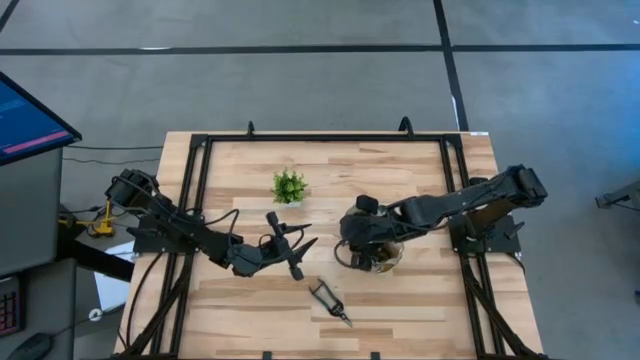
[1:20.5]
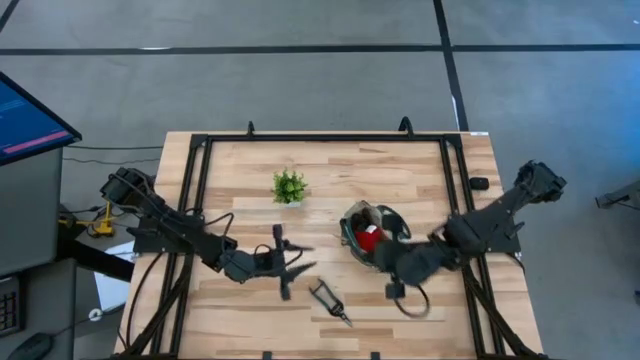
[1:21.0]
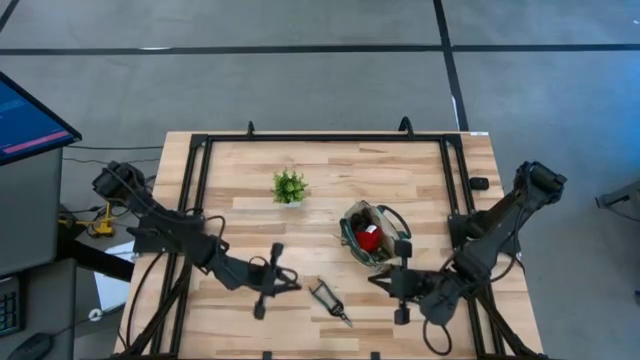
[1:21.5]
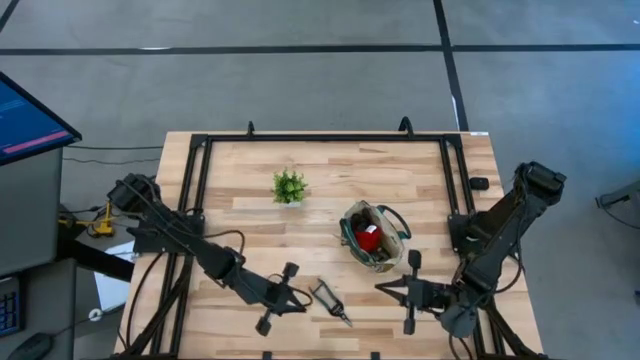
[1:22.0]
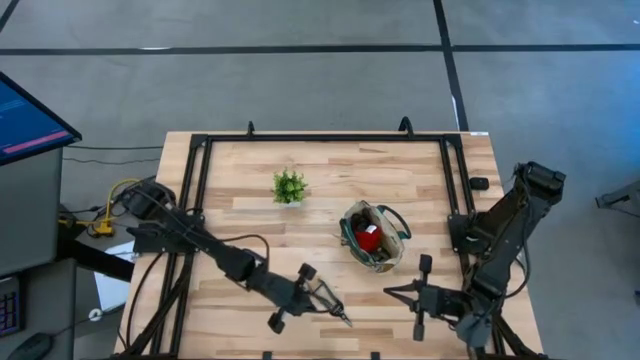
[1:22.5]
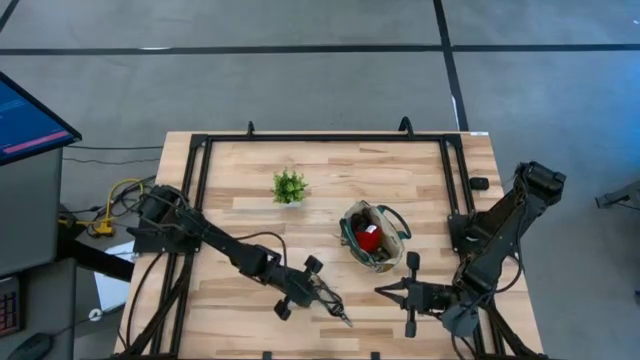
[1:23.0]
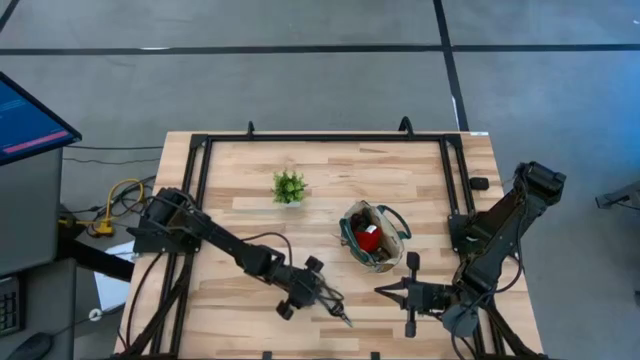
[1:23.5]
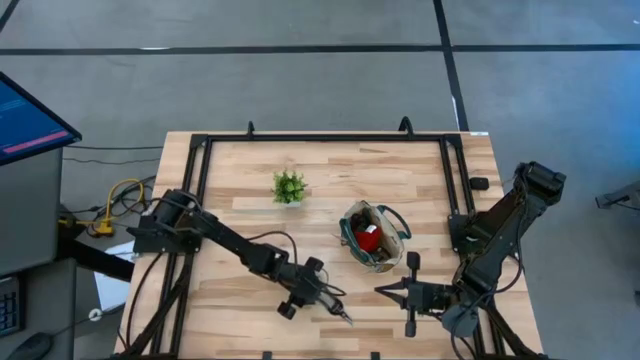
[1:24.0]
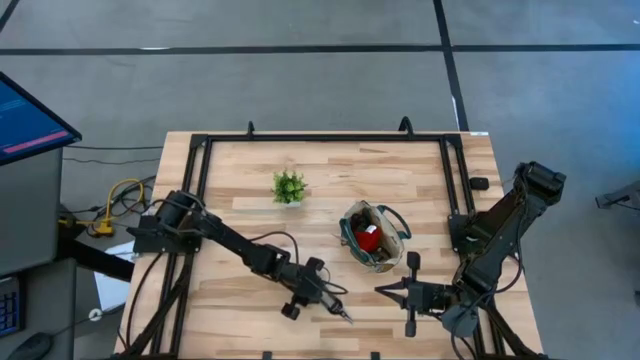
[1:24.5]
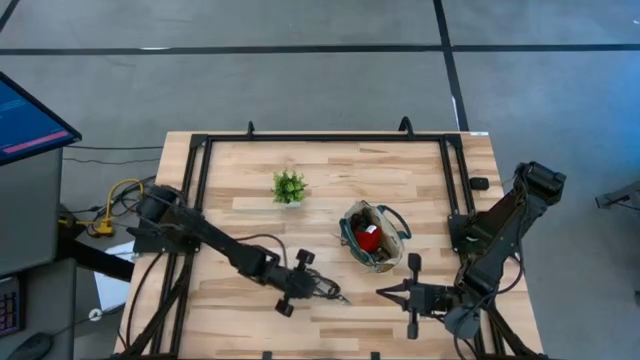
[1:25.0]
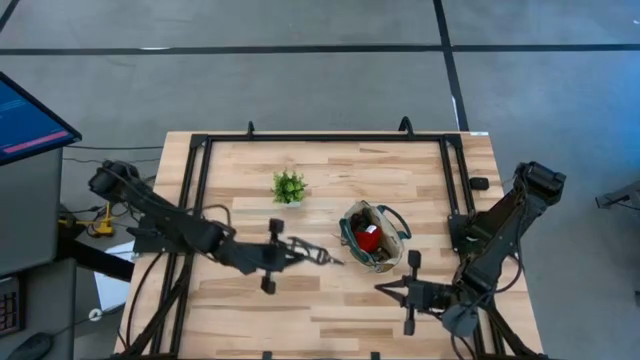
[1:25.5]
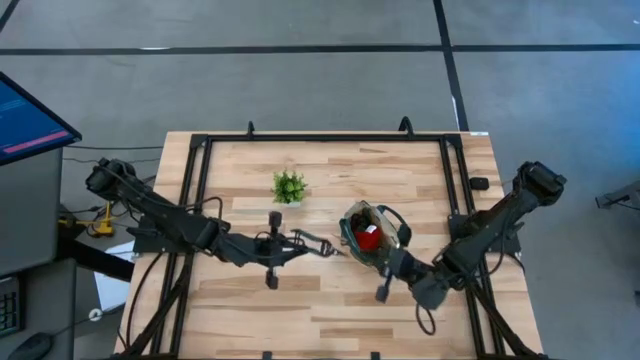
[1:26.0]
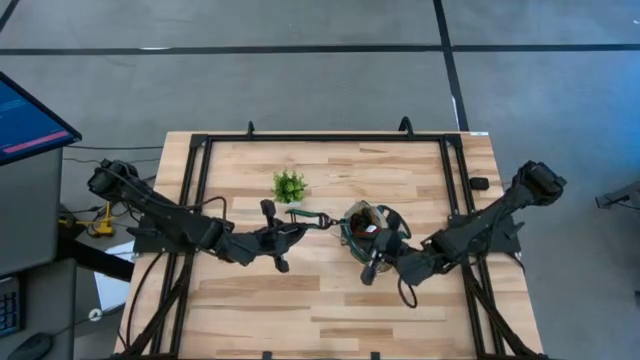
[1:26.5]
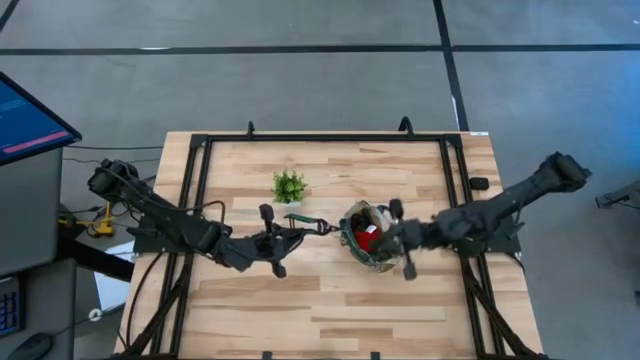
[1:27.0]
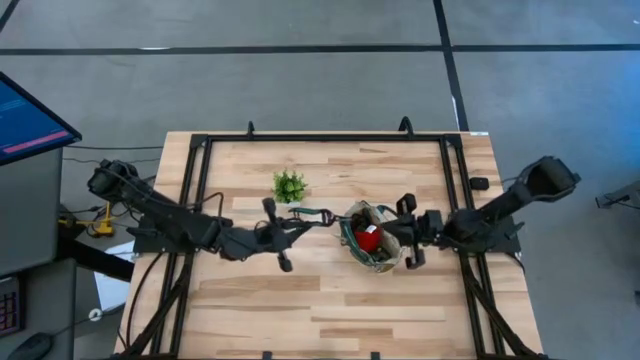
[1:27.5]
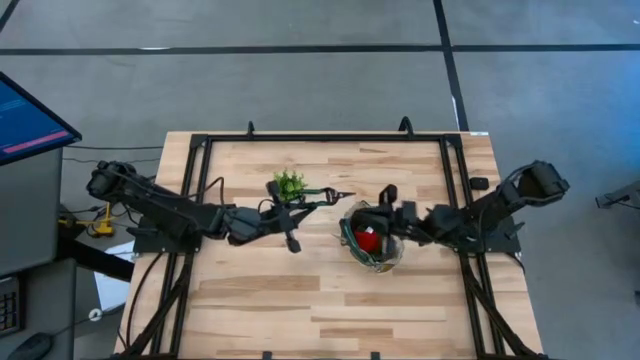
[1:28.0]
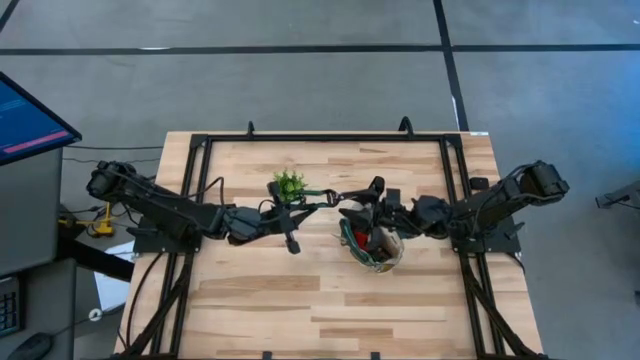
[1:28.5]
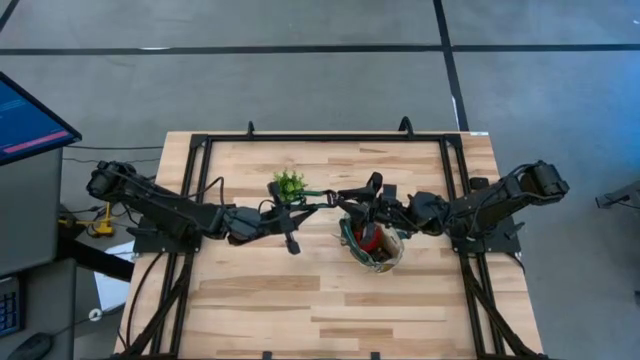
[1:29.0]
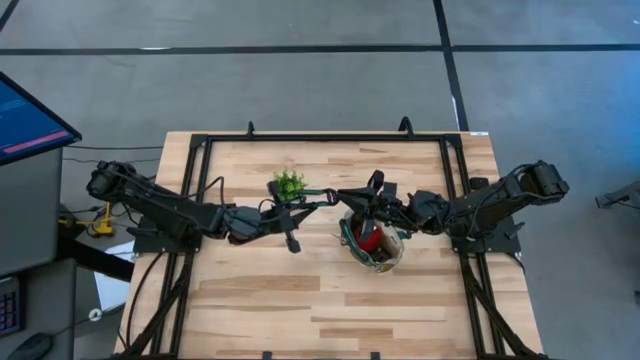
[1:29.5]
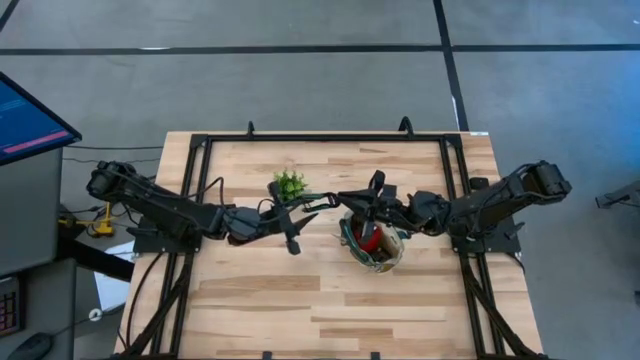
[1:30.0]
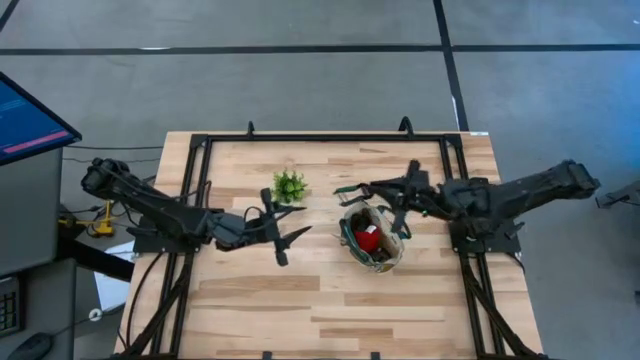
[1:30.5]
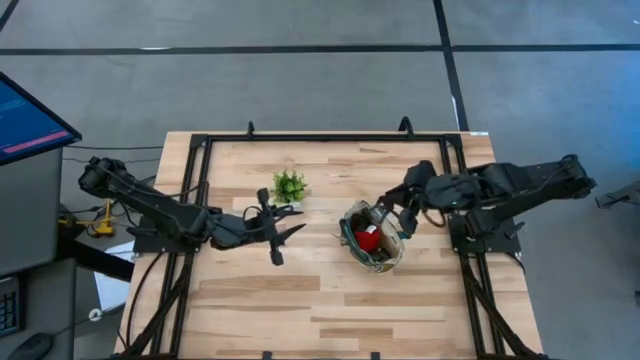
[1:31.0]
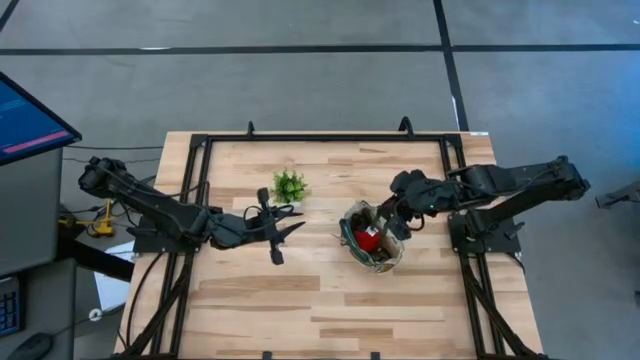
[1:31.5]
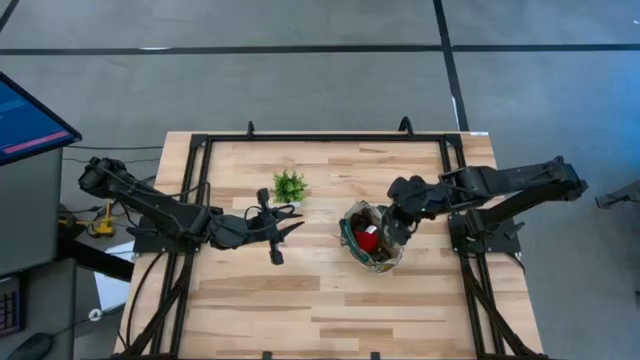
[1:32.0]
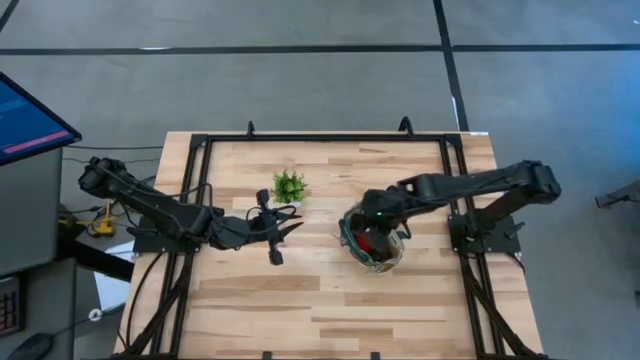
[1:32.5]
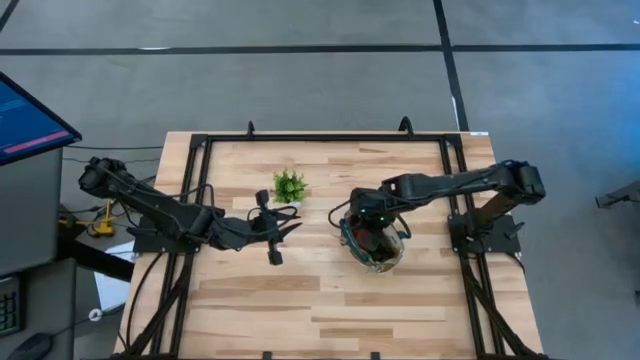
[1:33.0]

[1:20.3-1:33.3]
Task: Pick & Place Garden tools in Gardening bag
Put the green fruit pruner into the white gardening bag

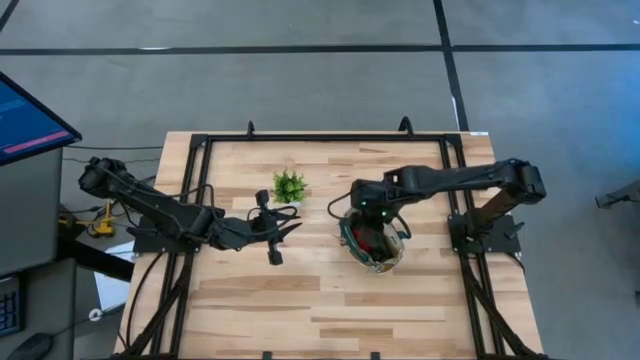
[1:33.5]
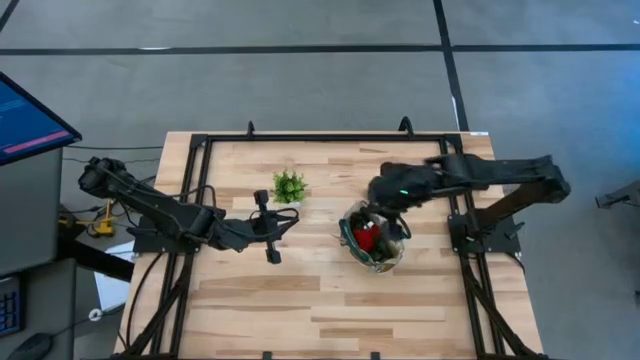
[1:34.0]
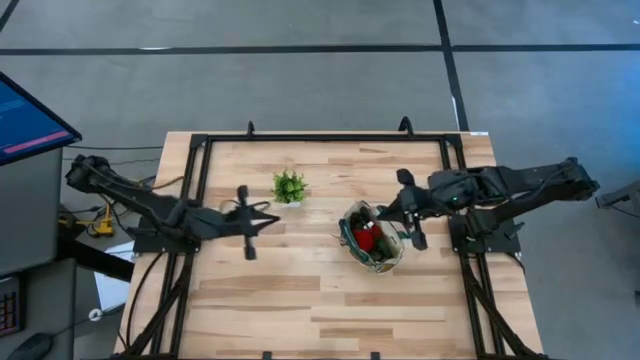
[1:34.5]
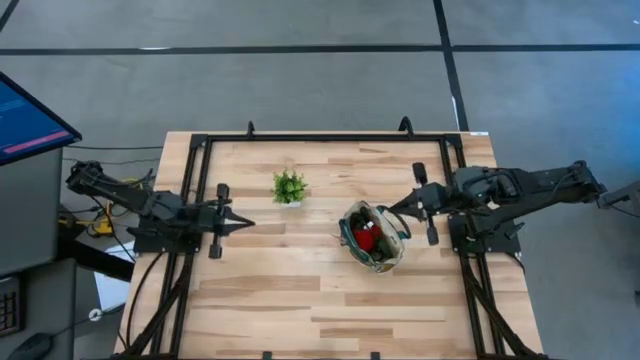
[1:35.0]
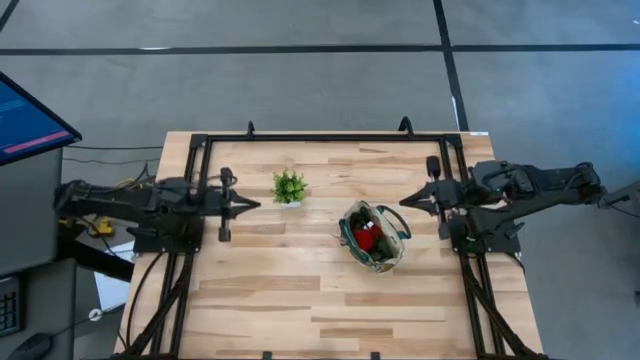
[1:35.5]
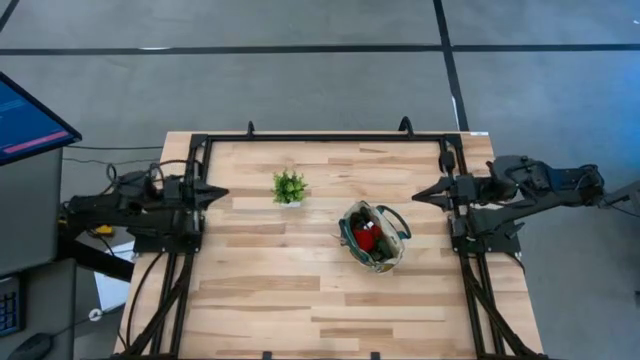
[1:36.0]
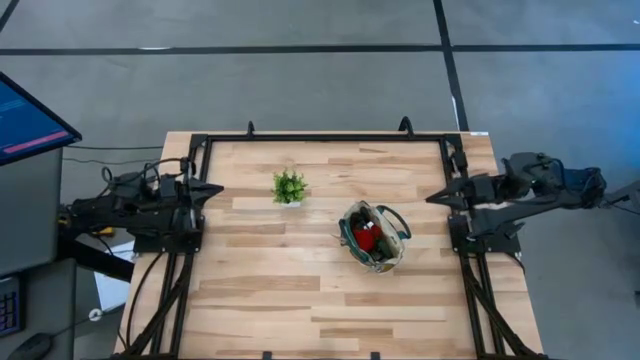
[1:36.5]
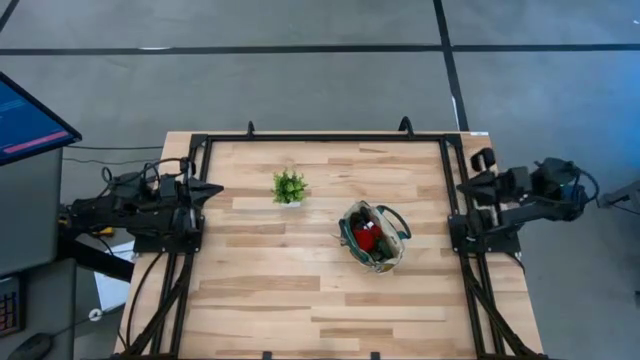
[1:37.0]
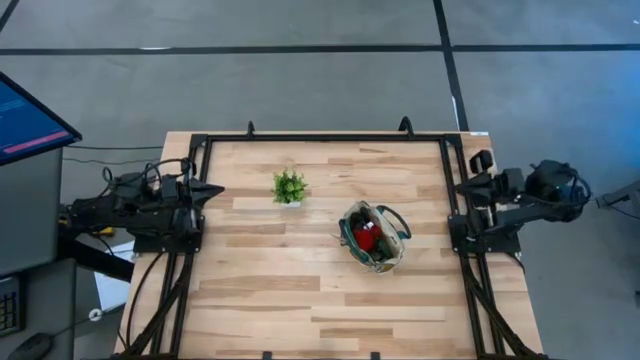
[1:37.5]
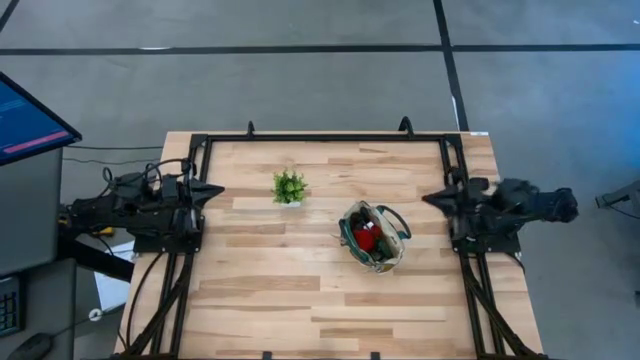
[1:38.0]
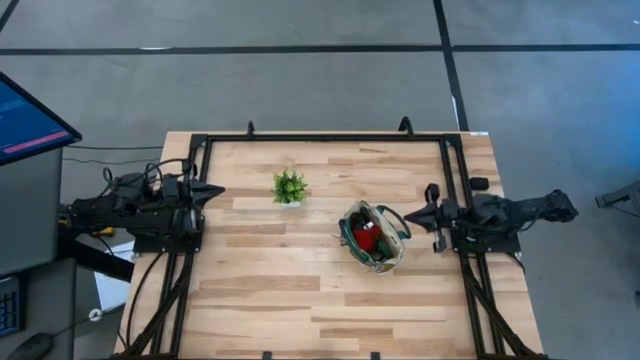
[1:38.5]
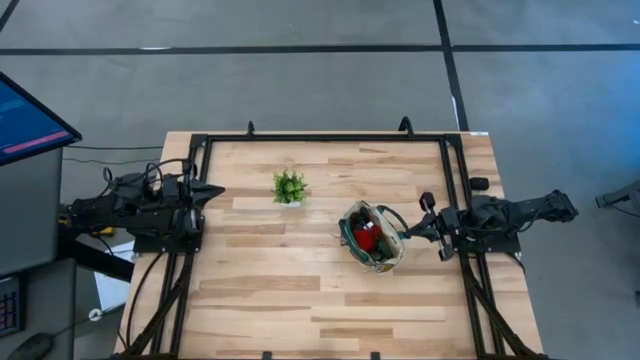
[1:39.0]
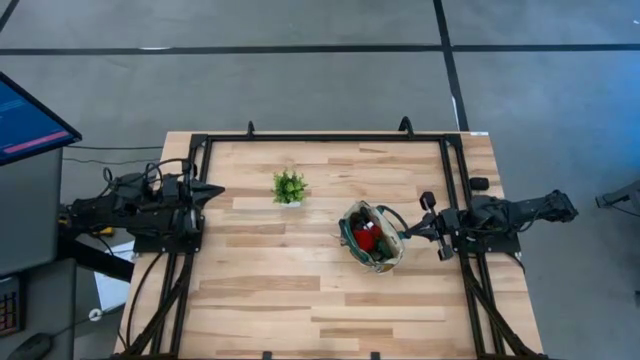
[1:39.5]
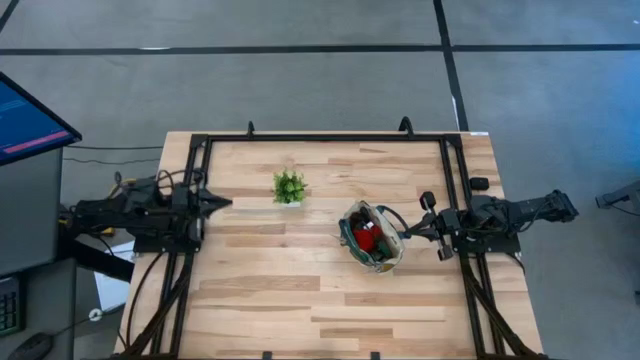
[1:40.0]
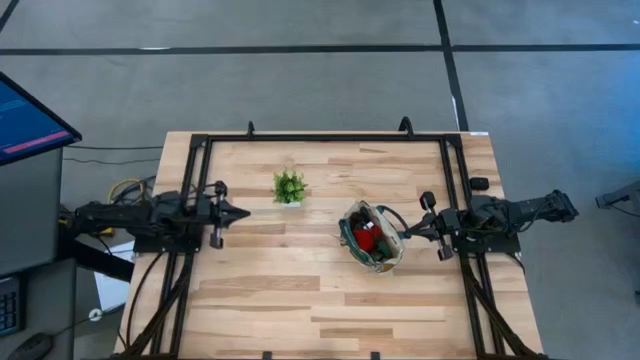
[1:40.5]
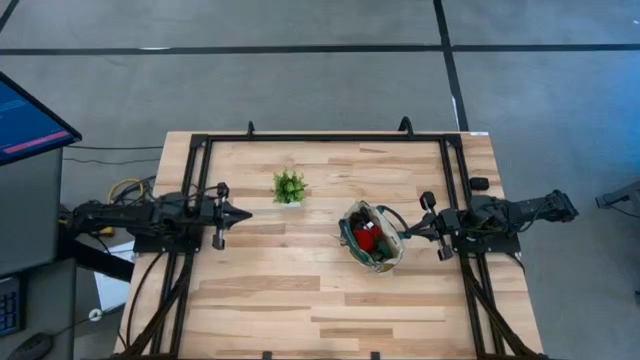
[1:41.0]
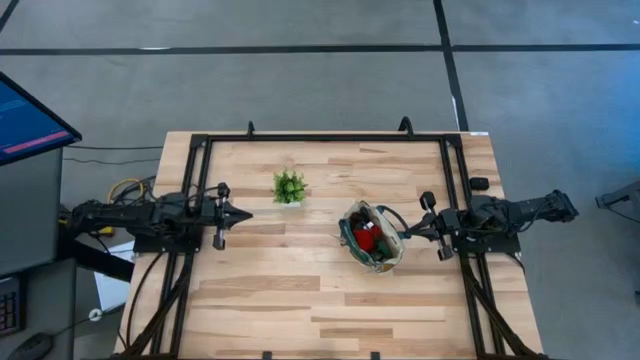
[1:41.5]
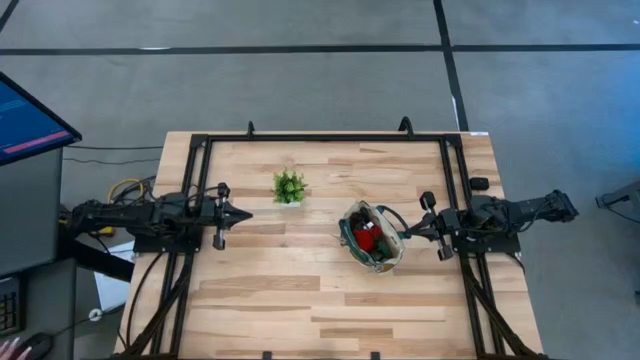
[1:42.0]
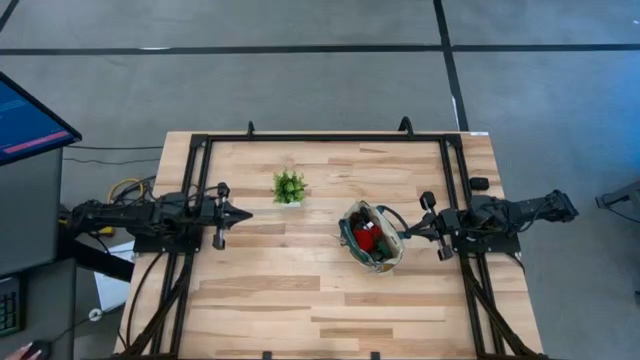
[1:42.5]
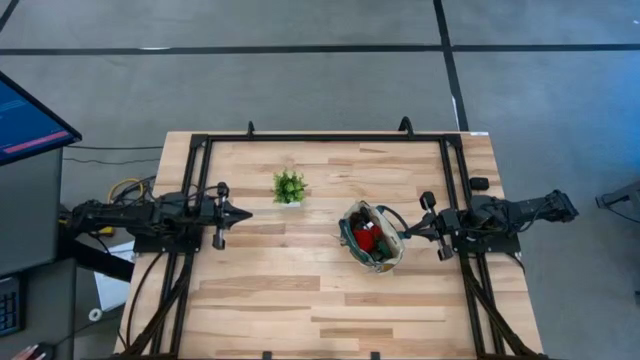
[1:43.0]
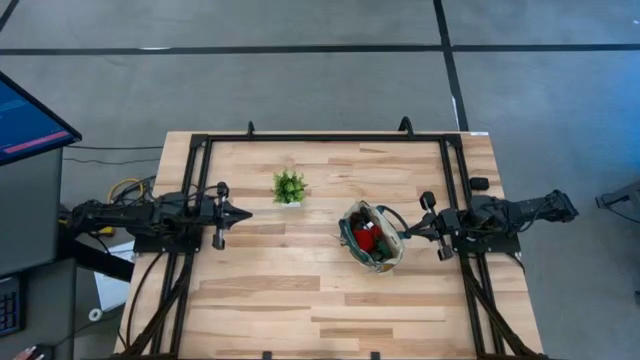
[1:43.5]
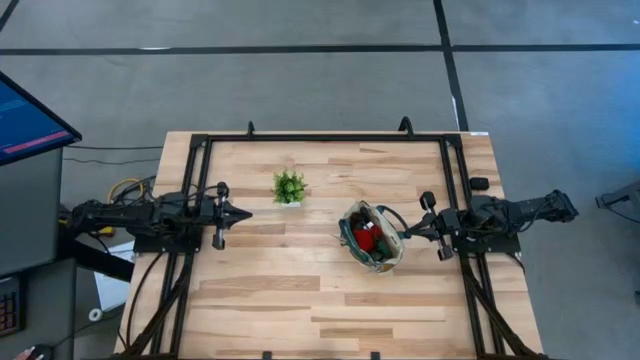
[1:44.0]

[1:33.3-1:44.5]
Return to Home Position
